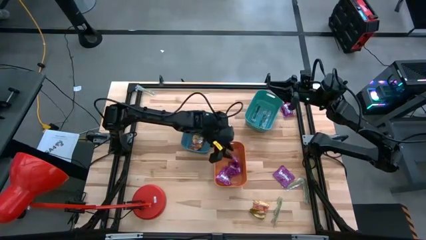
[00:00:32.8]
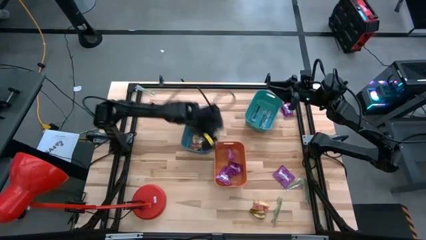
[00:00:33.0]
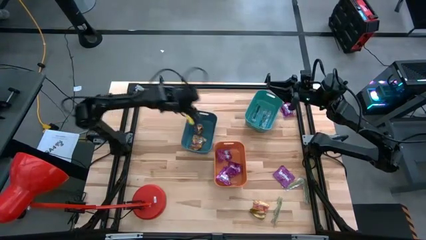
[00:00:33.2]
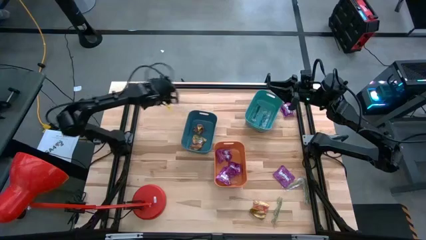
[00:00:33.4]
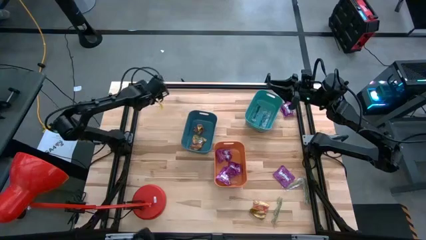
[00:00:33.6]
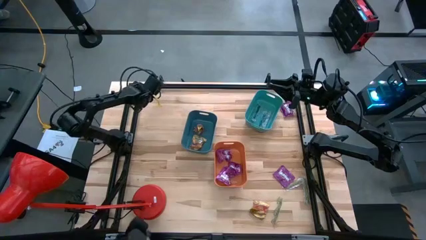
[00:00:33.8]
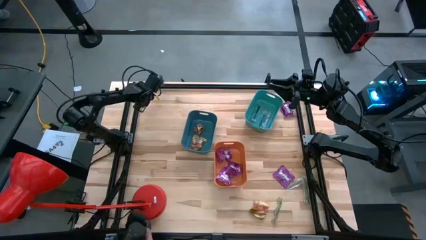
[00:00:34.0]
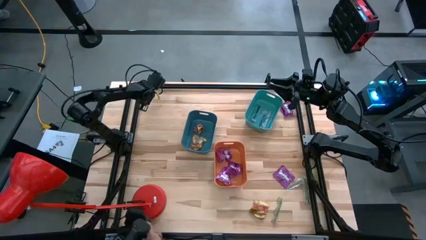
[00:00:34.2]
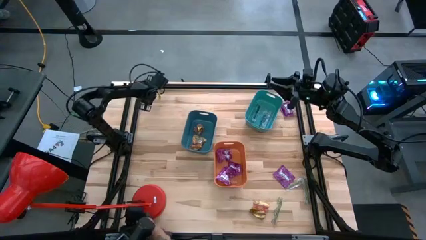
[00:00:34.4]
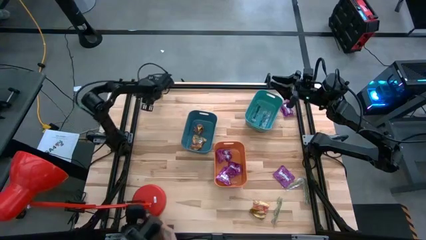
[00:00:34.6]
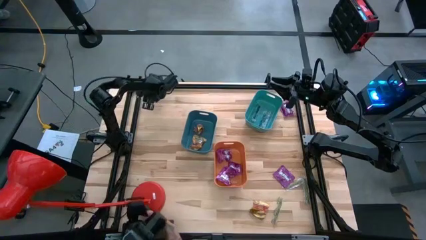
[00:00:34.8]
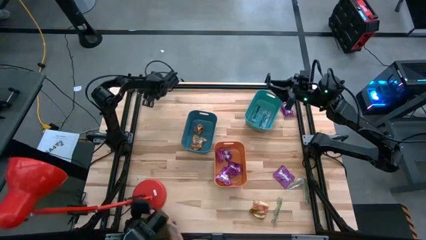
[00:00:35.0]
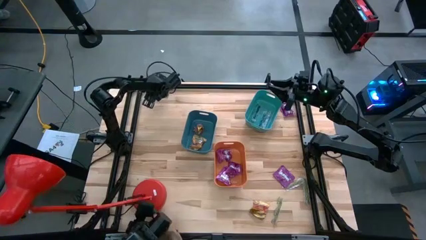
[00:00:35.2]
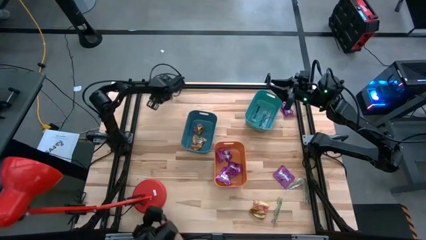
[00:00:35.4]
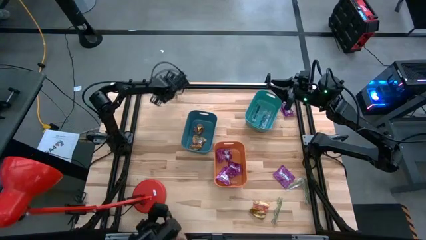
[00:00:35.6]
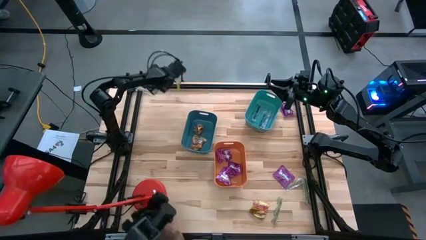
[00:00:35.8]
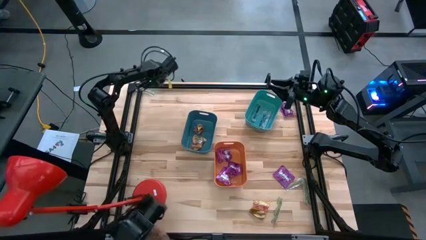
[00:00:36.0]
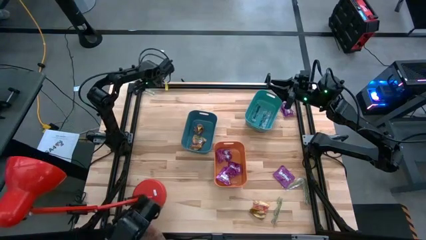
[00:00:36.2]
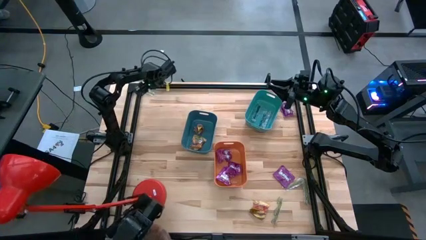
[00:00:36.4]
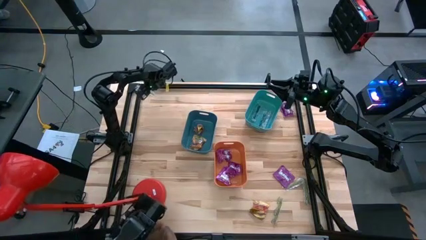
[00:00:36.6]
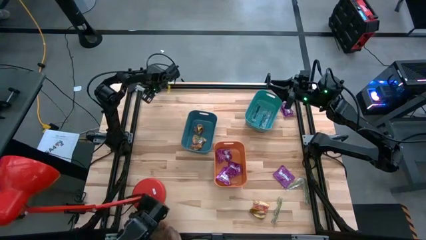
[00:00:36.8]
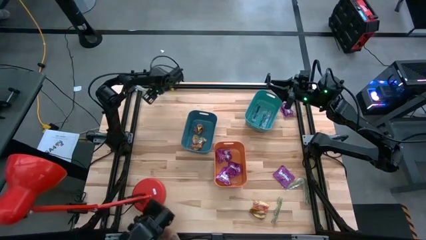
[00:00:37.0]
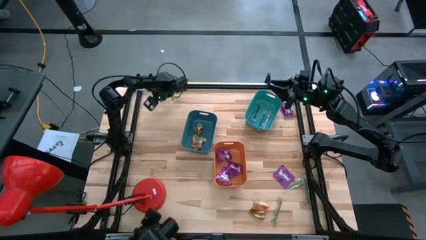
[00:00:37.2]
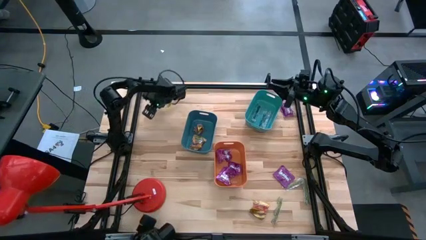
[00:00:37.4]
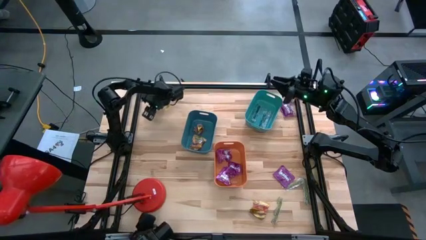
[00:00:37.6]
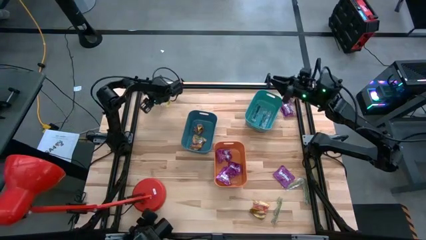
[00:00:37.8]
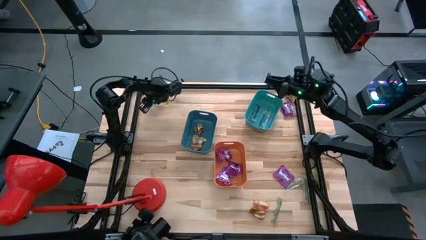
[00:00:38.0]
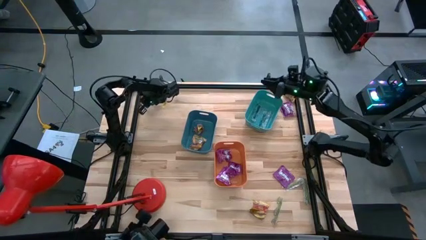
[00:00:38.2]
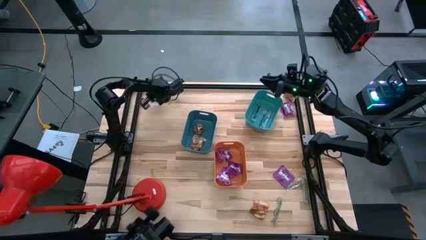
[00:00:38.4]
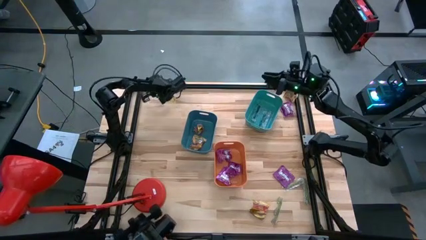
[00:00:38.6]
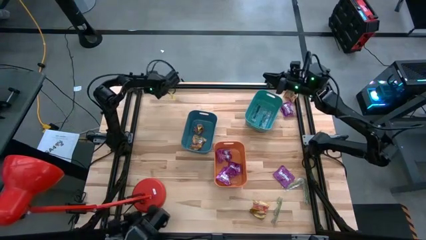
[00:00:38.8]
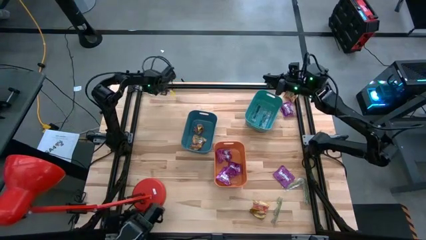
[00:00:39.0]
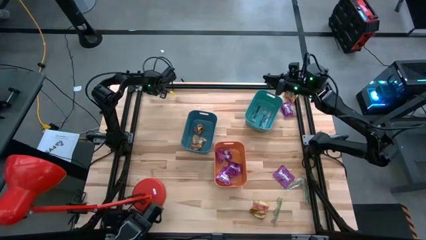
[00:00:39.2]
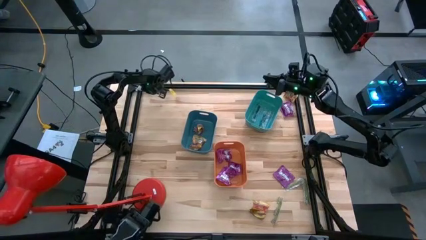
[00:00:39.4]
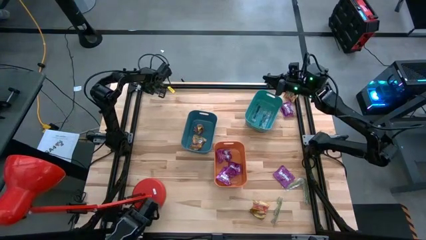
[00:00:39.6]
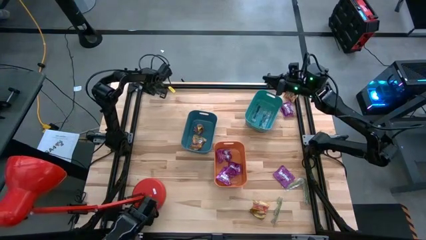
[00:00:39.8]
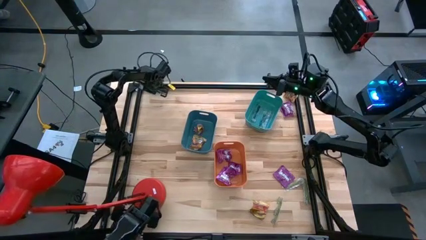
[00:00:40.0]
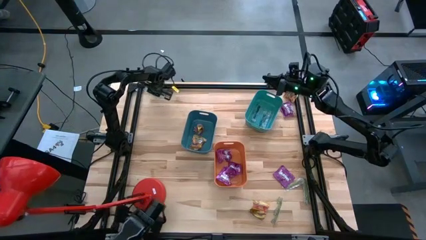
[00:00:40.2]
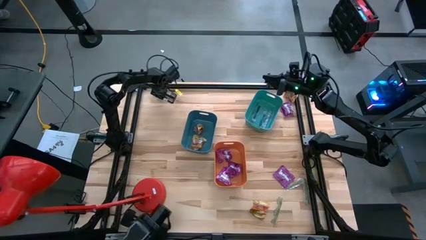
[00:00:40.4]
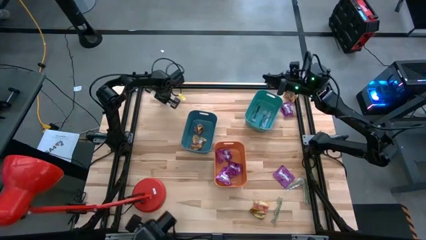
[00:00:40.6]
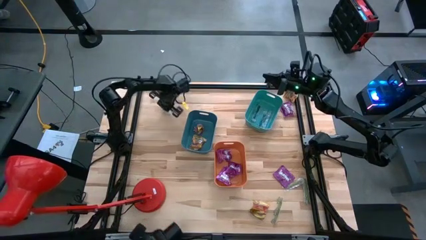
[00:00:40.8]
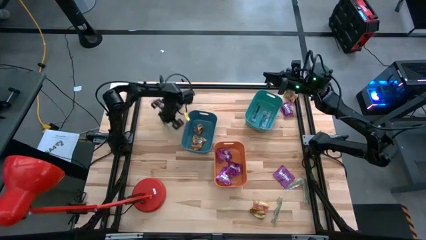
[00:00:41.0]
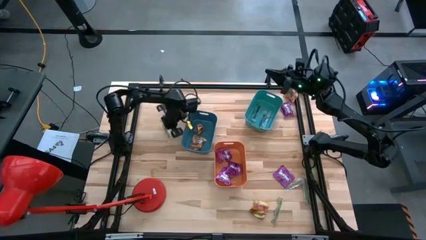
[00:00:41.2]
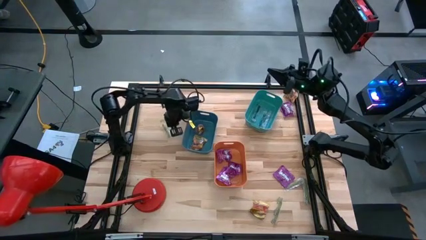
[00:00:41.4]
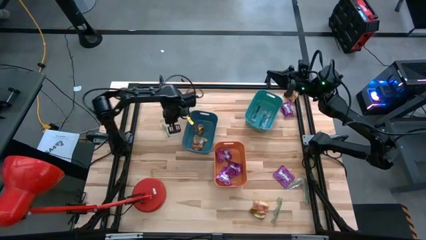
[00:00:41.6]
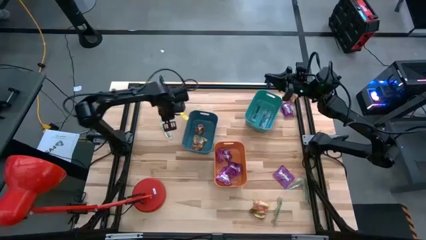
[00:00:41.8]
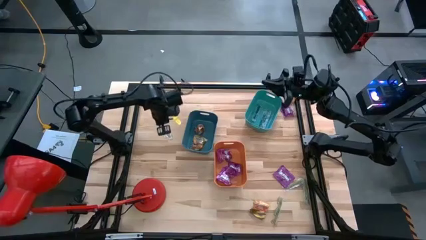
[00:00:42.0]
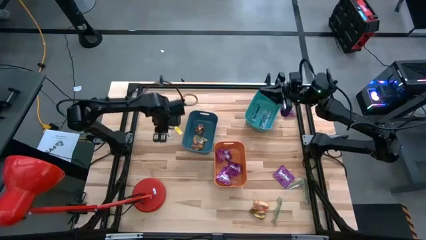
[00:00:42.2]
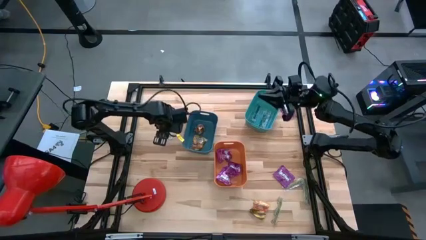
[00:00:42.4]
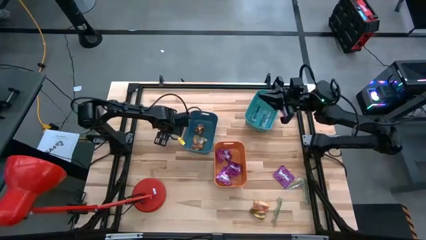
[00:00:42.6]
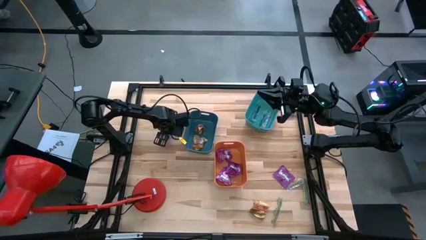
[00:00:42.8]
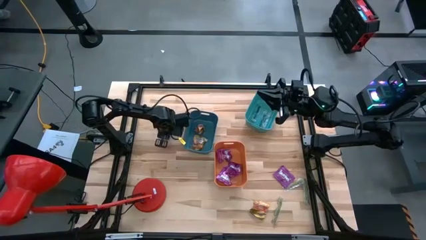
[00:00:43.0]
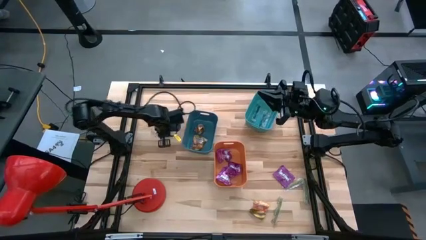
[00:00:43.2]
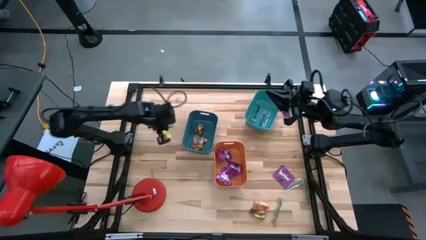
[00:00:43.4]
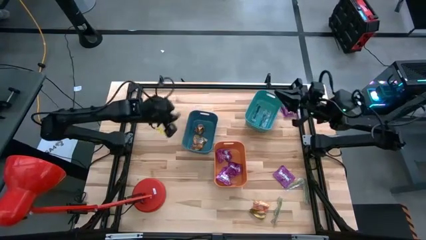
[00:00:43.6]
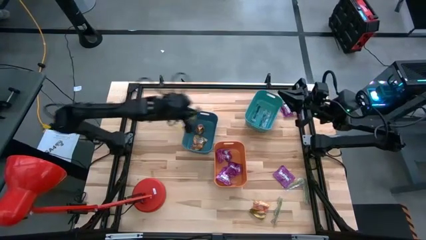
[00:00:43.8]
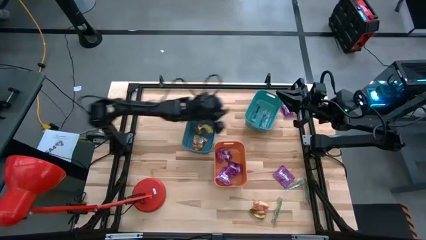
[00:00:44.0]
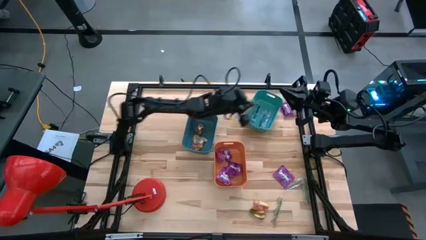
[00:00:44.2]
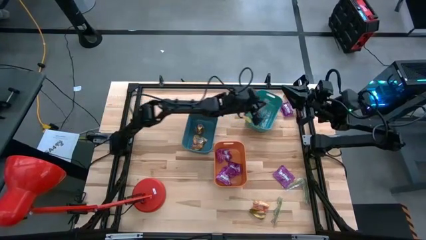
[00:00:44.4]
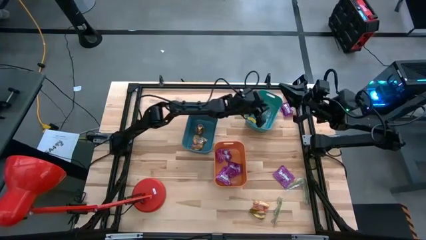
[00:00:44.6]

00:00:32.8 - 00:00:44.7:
Task: Sort candy
Put the green gummy into the green bin

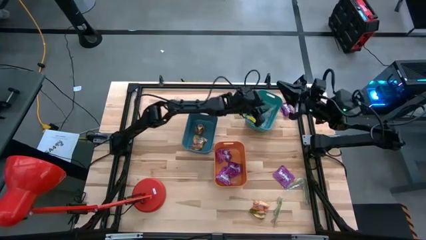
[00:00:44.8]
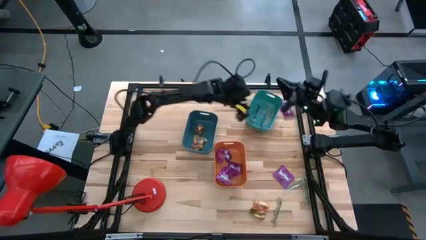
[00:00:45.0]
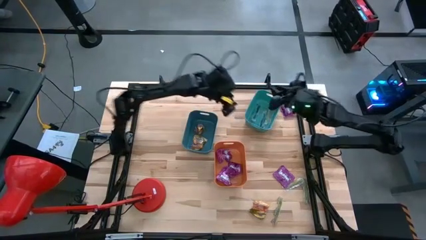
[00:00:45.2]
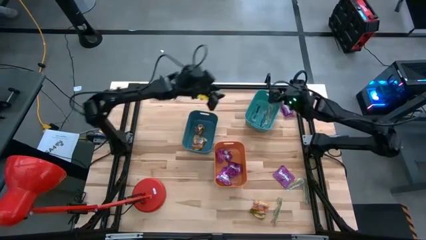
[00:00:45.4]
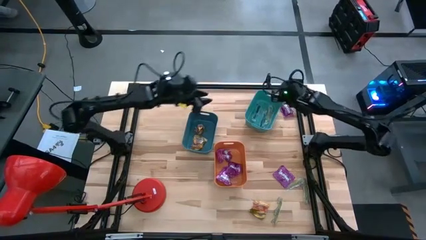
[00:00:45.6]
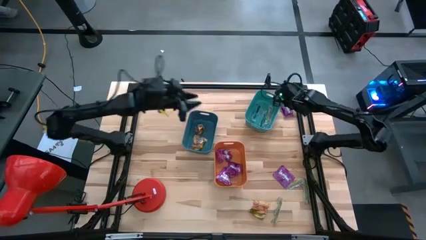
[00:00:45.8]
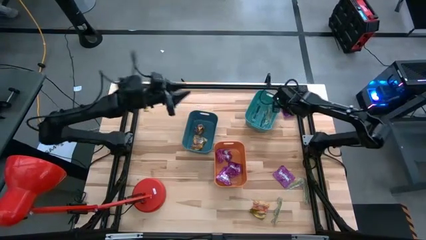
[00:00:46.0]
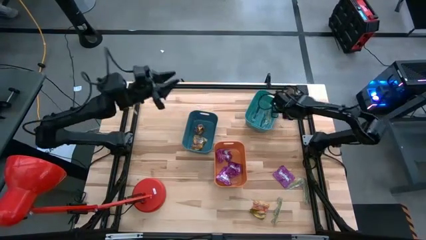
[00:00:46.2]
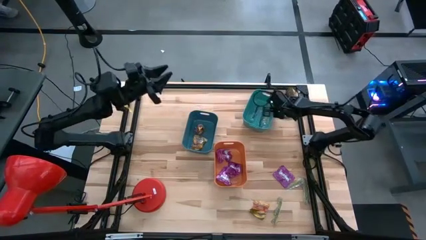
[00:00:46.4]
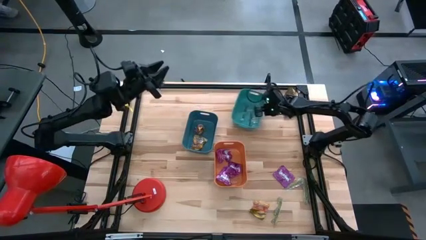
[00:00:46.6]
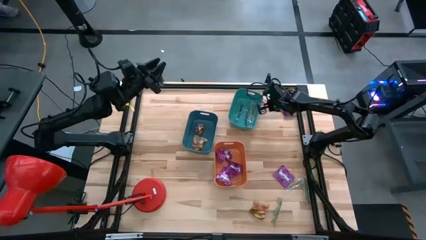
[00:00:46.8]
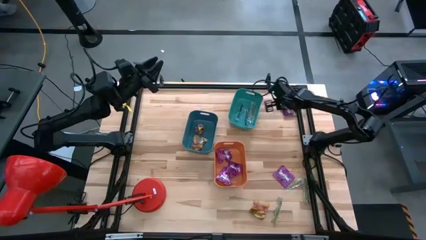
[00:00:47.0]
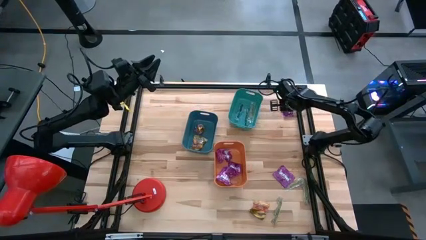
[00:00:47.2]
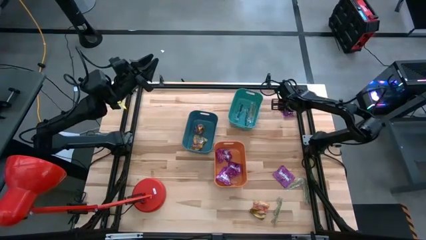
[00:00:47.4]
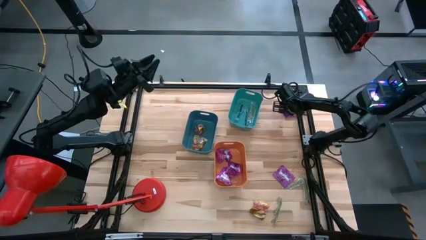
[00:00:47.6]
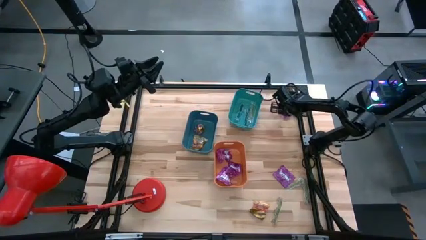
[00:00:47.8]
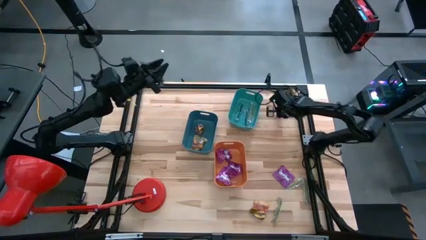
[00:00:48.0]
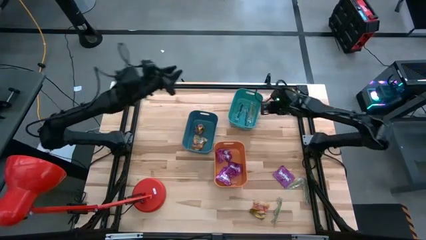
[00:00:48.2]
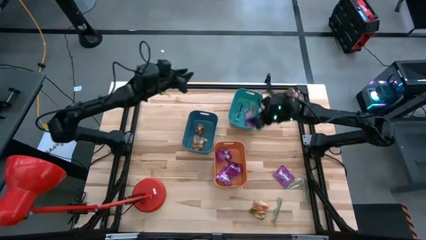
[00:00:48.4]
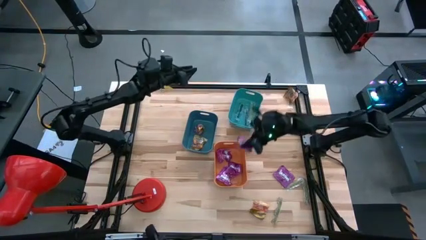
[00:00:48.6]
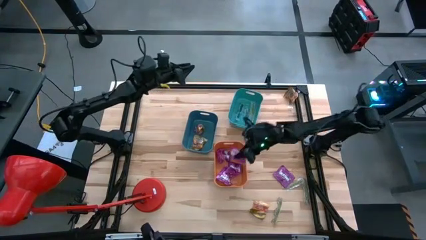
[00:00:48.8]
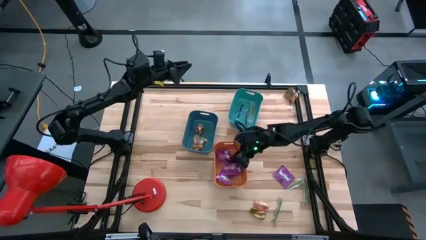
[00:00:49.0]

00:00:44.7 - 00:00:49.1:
Put the violet candy into the orange bin

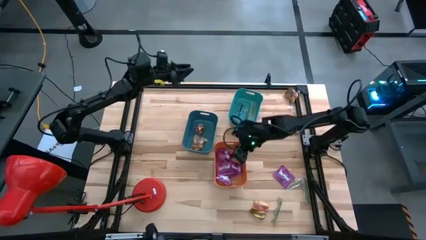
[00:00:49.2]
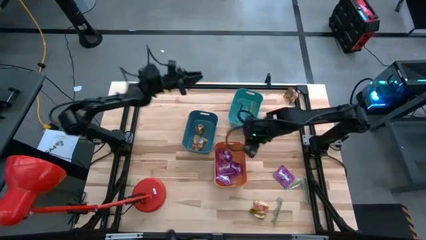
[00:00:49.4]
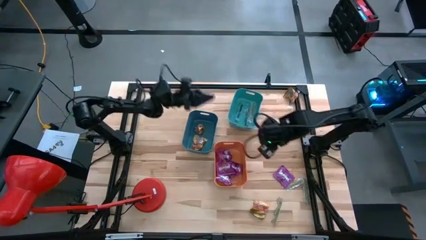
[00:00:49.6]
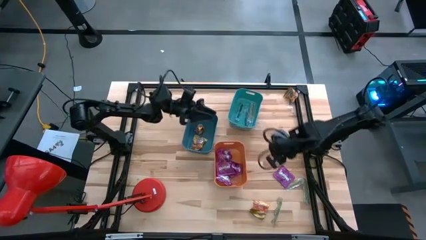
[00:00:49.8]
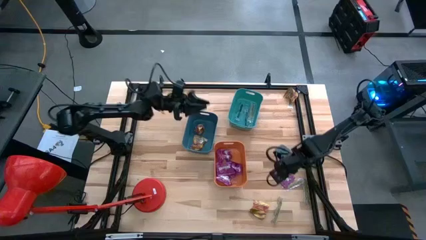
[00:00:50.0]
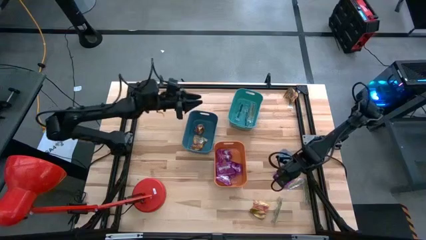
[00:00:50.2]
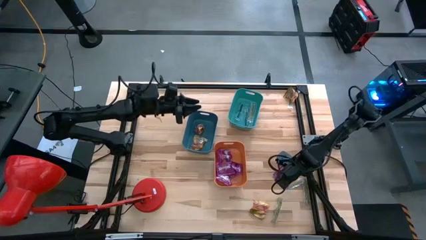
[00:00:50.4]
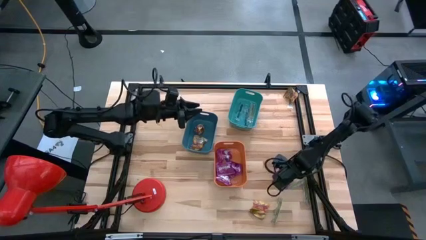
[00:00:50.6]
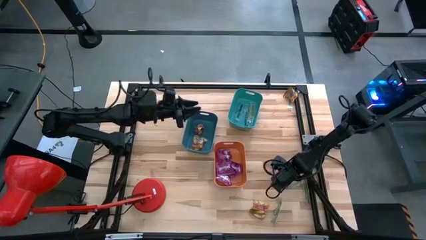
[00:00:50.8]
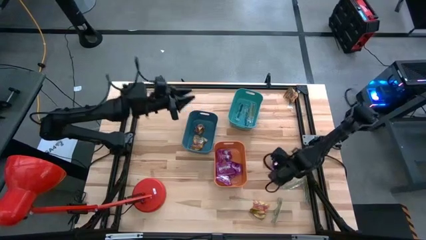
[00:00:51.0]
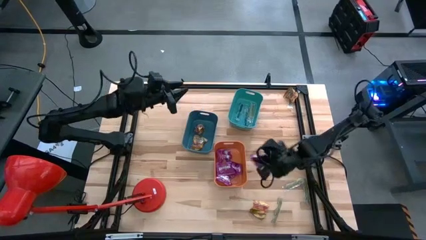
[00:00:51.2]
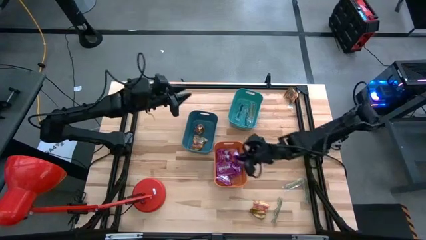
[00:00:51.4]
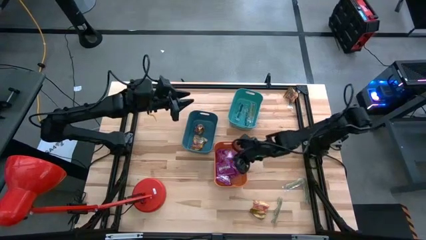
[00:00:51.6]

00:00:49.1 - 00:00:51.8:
Put the violet candy into the orange bin
